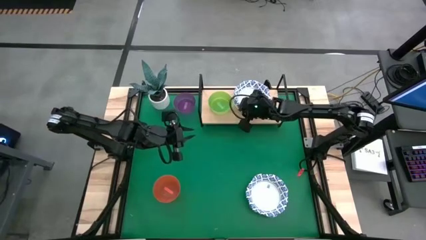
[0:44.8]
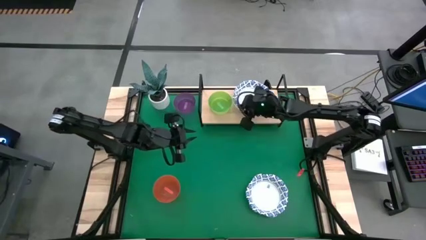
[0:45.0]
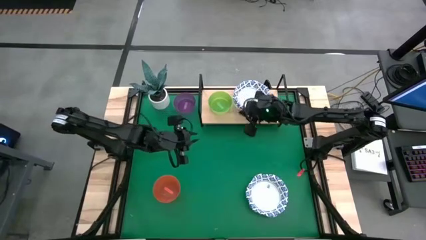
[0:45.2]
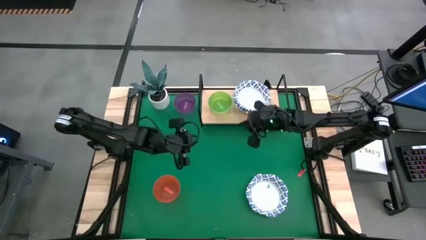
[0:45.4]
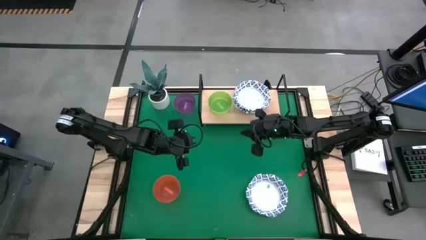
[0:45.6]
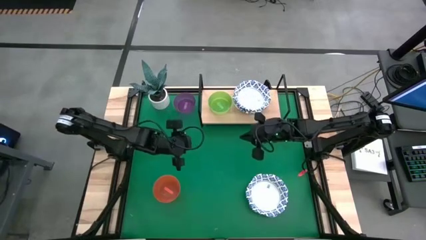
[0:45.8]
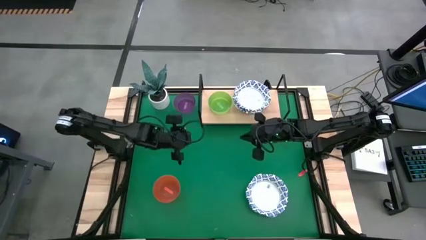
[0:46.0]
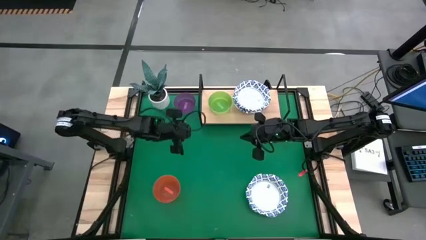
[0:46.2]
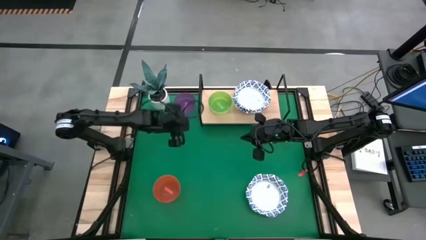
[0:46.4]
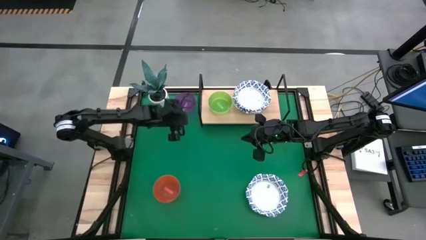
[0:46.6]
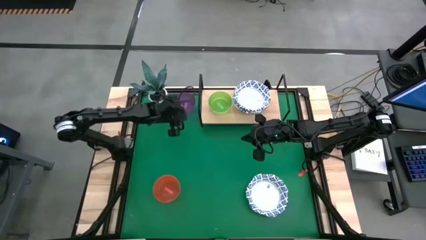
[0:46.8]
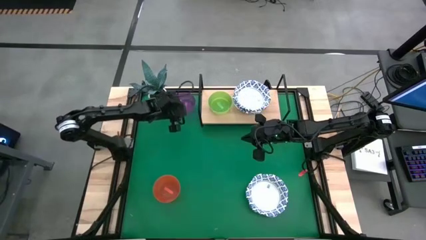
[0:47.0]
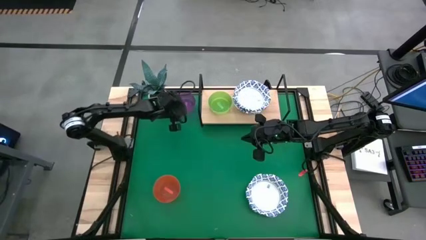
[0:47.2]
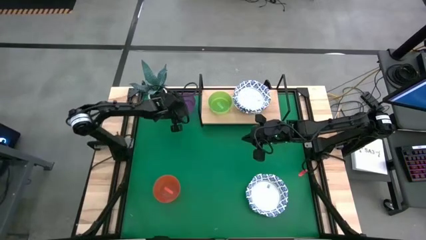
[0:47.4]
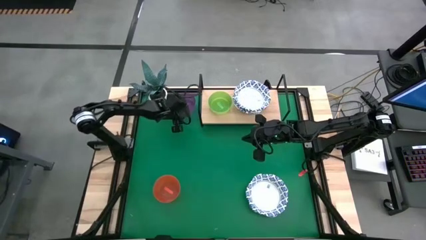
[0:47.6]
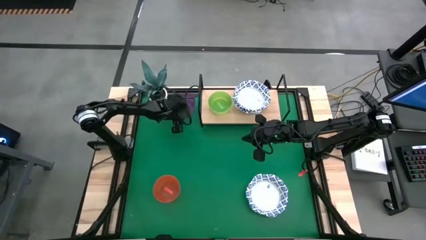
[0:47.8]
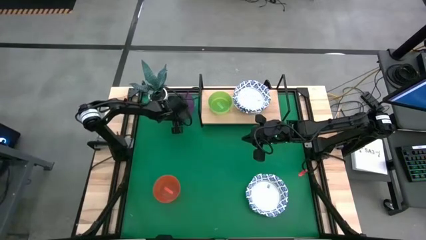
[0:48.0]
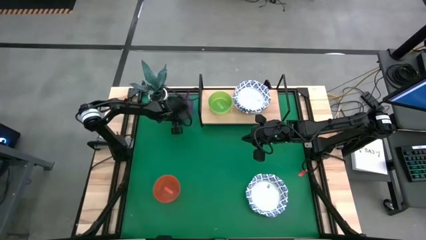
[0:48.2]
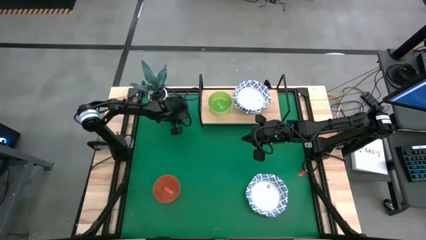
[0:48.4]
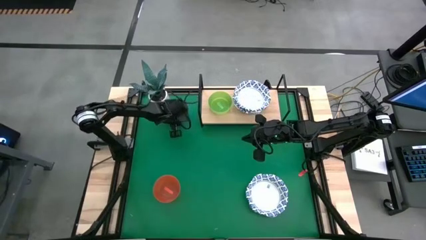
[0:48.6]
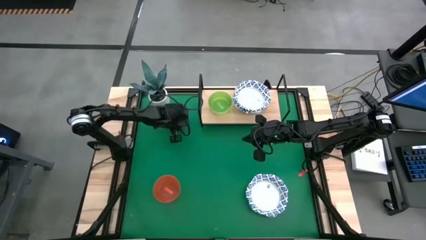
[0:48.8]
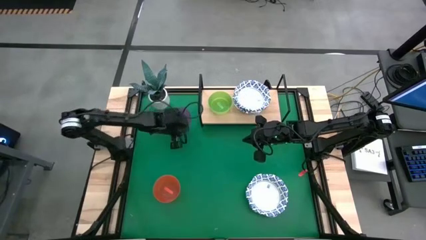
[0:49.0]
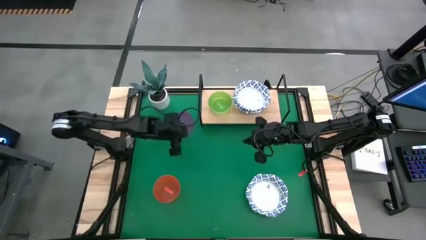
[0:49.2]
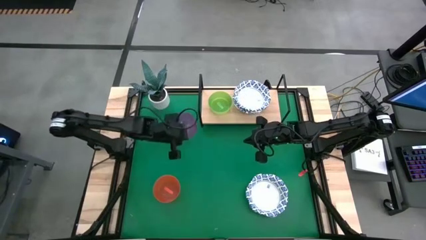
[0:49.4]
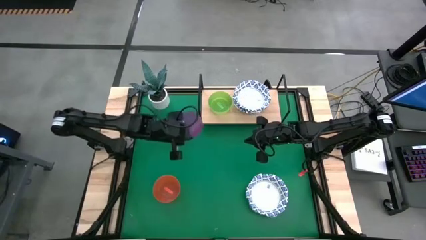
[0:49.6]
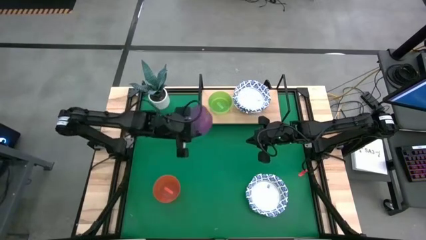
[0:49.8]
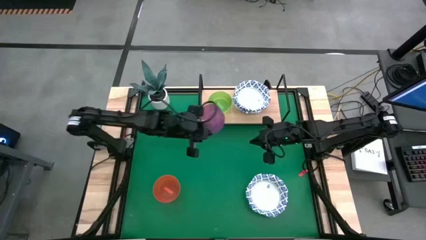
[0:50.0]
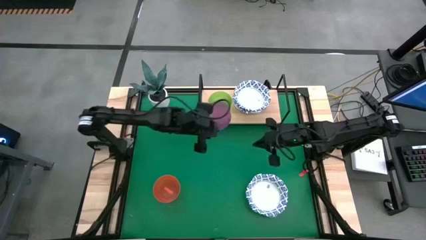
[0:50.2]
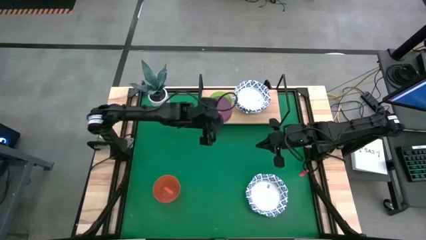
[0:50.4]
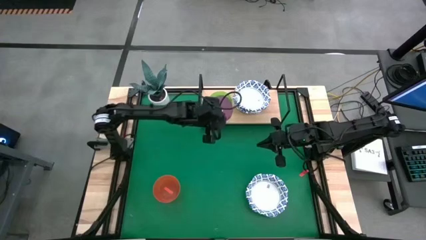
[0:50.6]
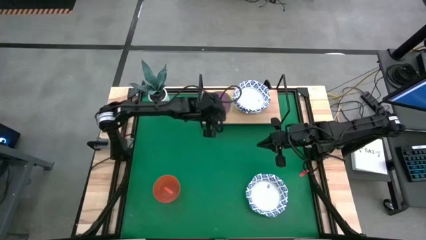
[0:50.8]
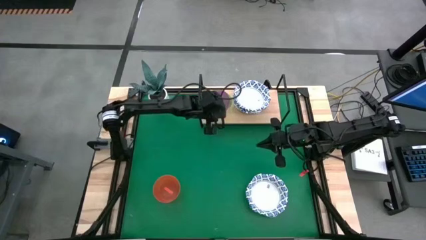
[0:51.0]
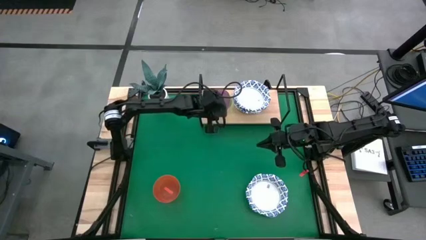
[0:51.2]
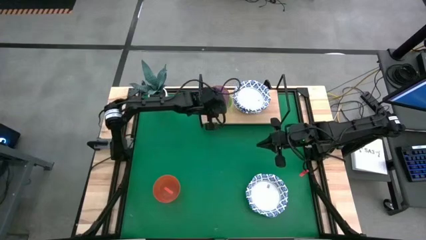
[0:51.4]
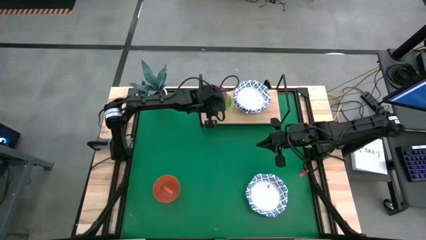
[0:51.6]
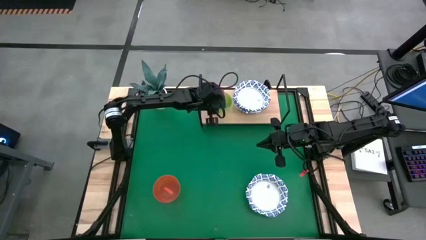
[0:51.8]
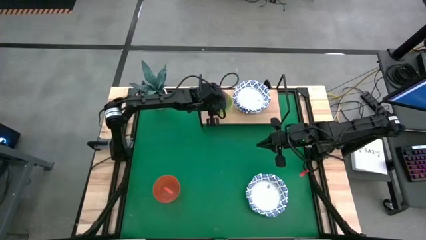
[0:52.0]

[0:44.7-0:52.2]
Task: Place and stack bowls onto a shelf
Stack the purple bowl into the green bowl on the shelf

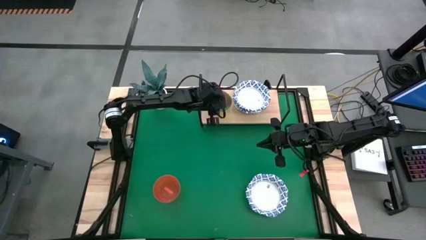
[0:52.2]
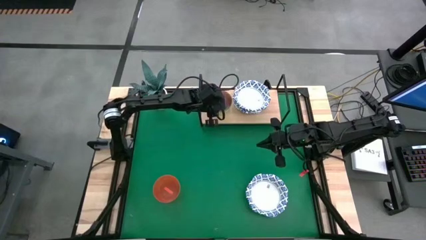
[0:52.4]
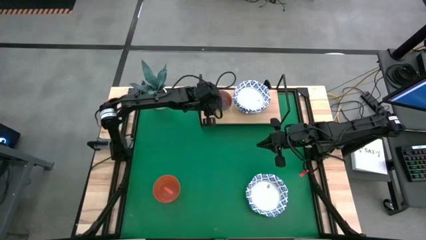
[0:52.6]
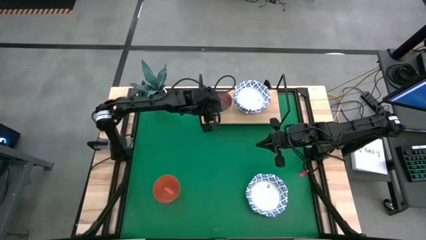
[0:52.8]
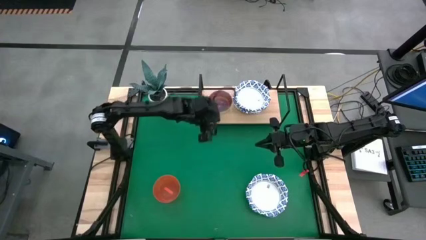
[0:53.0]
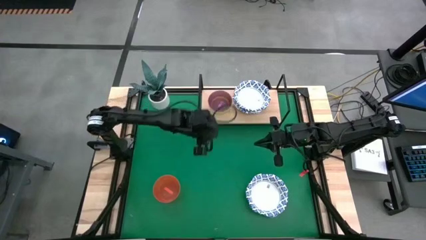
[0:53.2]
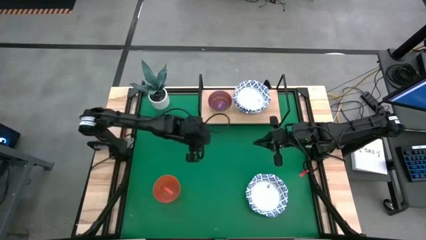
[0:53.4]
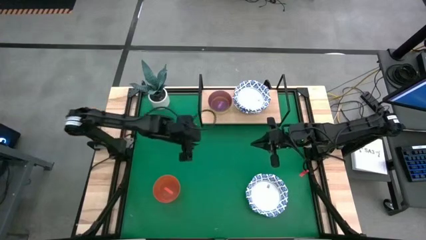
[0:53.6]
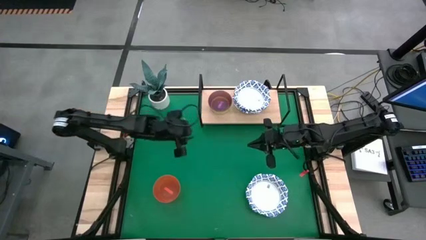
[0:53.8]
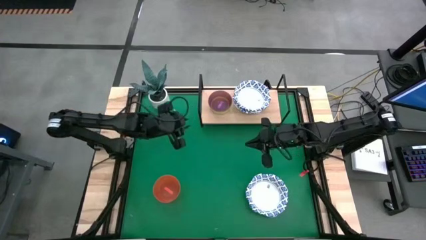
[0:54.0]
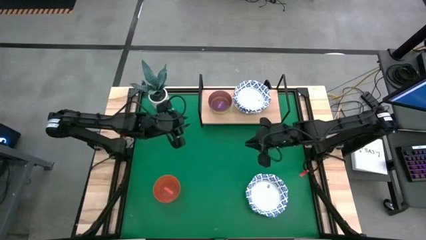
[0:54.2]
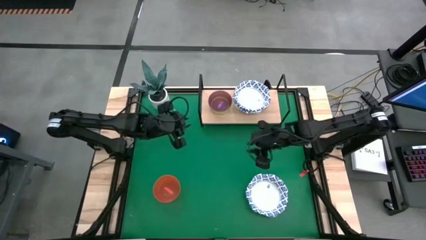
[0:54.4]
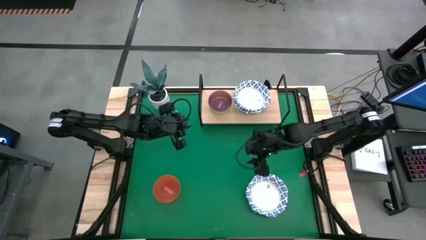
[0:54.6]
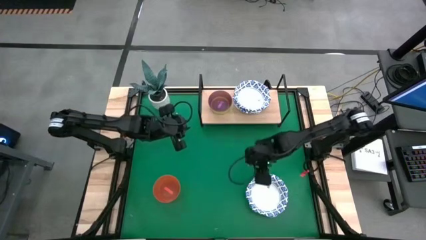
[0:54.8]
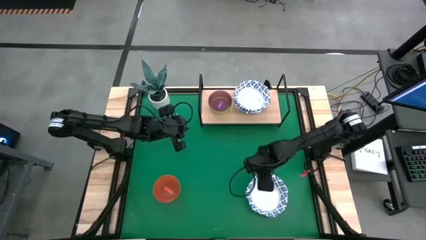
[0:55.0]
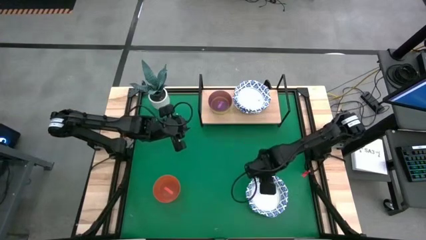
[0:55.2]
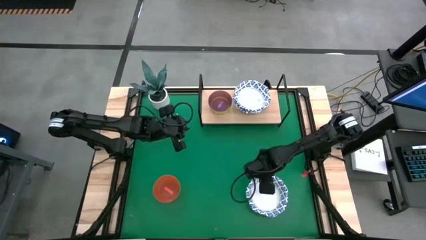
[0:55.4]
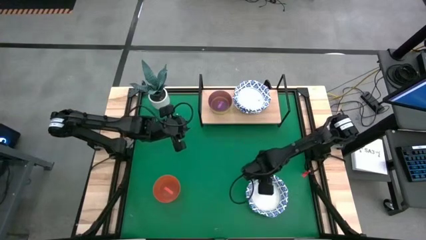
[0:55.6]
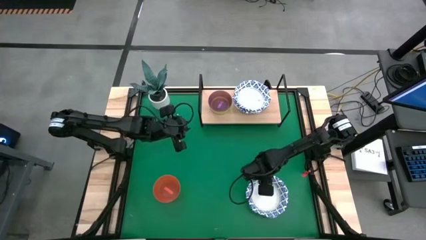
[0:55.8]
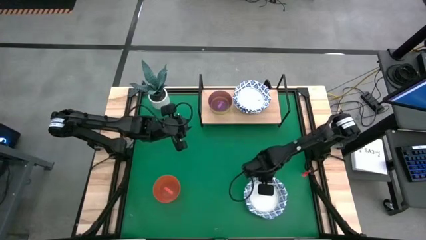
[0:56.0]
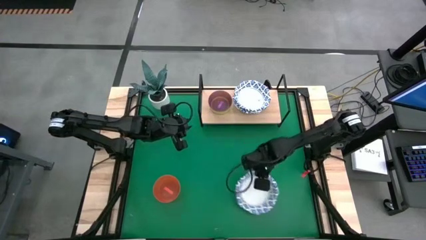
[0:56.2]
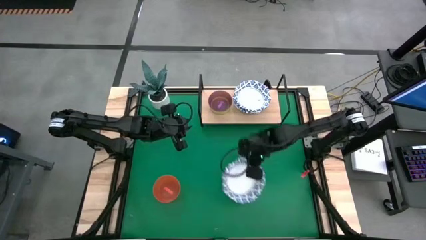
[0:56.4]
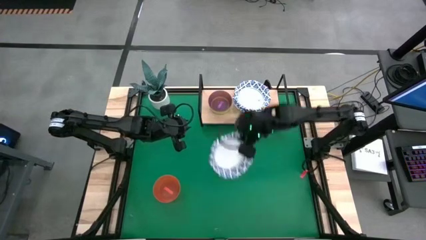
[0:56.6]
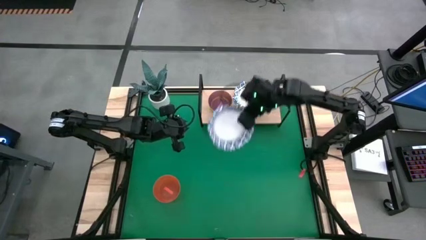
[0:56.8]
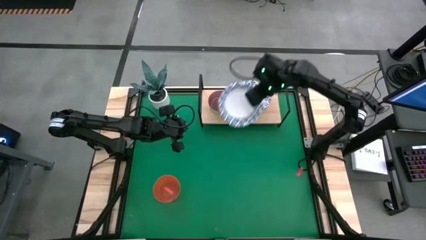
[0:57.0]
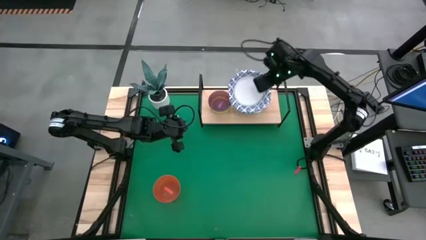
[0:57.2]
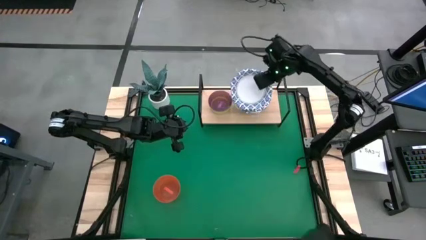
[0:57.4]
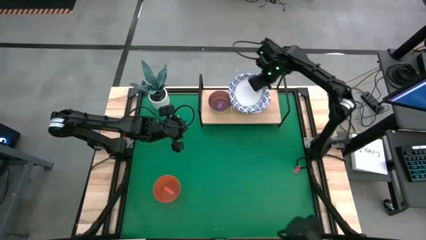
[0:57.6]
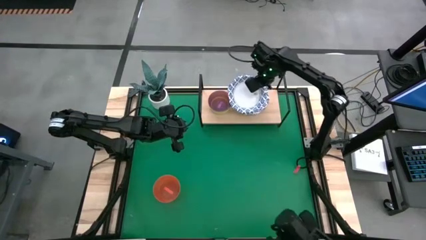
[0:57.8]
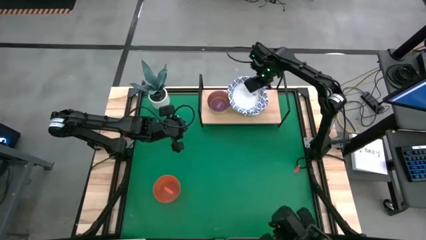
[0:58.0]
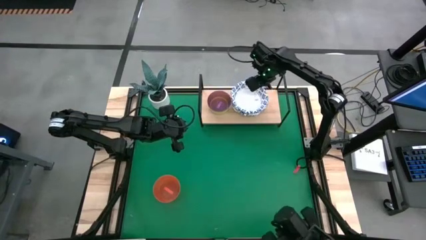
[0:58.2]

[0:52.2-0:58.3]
Stack the white bowl into the white bowl on the shelf

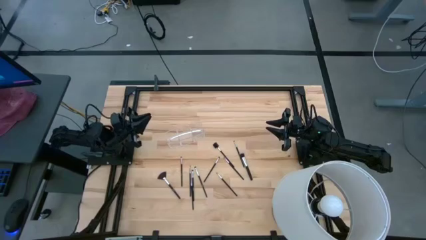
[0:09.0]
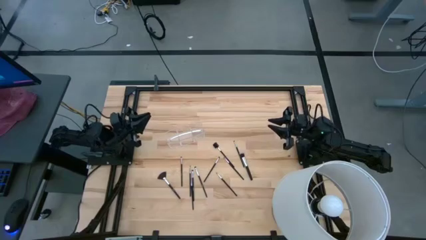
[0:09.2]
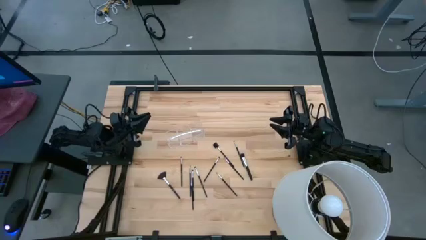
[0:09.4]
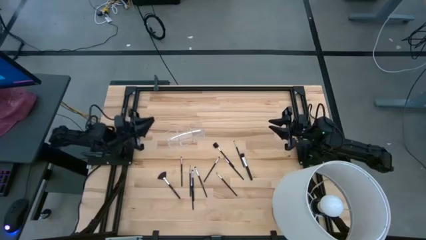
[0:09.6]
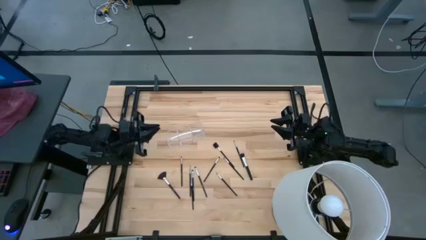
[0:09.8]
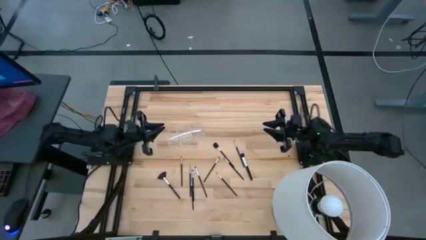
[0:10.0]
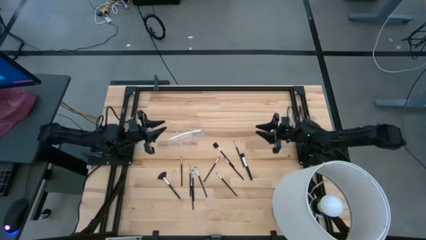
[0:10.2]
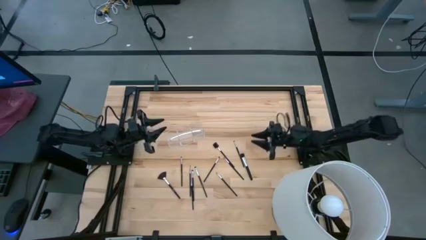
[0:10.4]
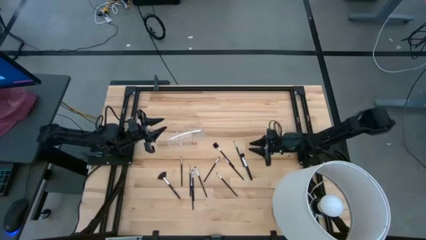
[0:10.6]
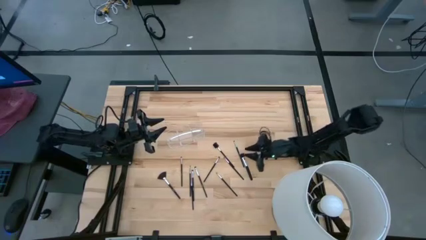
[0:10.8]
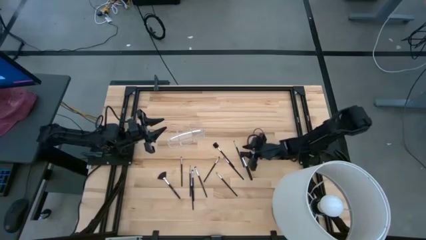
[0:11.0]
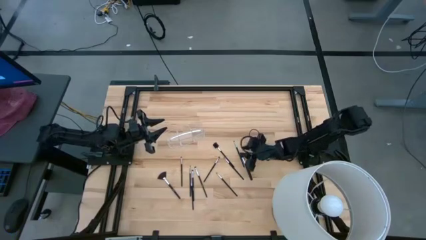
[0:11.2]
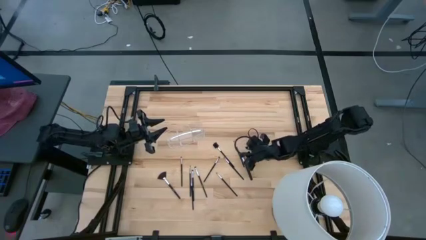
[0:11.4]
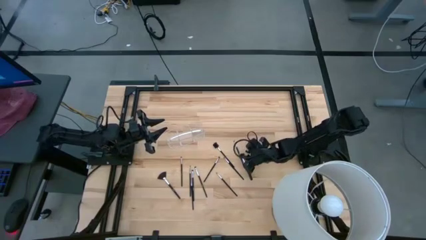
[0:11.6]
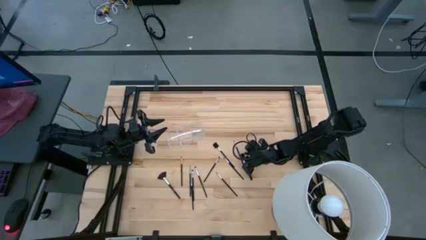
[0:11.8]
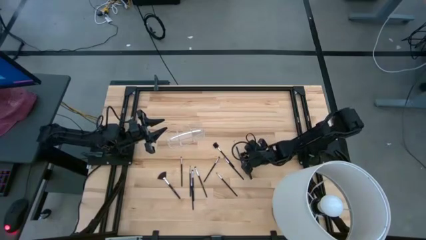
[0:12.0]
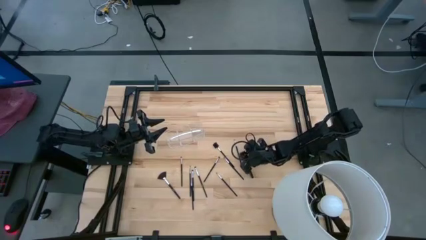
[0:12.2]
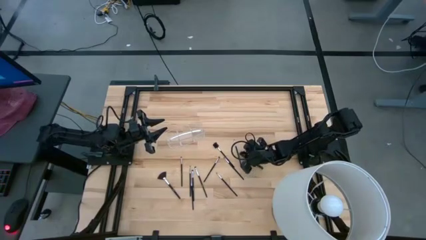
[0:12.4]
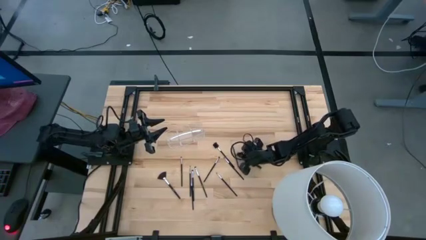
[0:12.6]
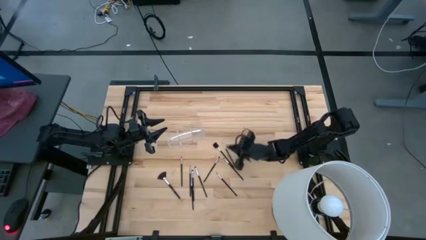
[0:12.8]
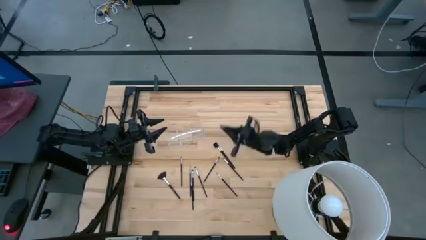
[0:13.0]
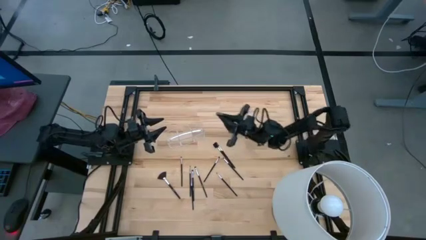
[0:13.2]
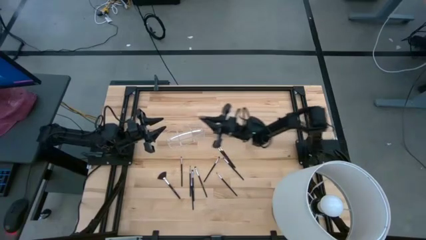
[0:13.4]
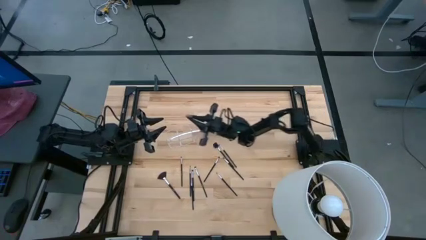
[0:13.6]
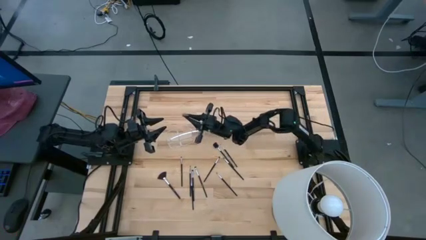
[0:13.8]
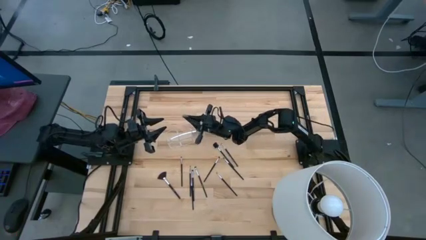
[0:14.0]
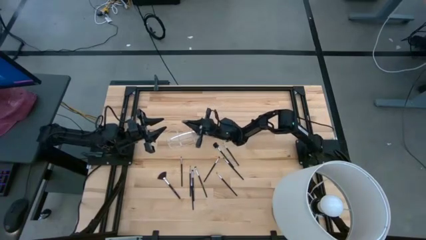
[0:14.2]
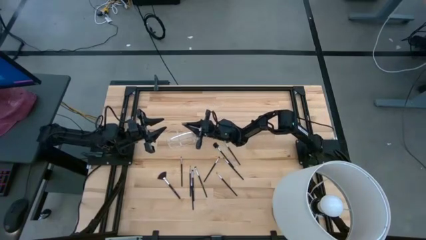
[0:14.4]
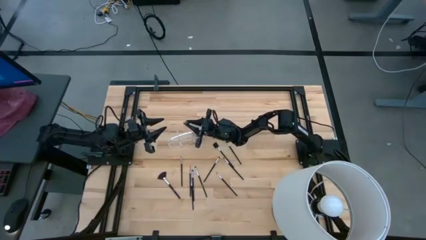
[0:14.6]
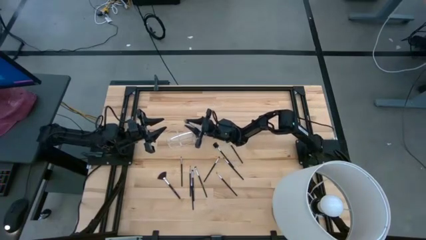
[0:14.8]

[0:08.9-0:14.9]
Task: Put items in baskets/containers
Put the blush brush into the right section of the transparent organizer
